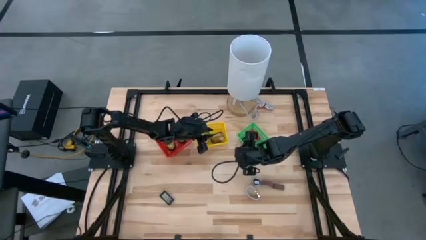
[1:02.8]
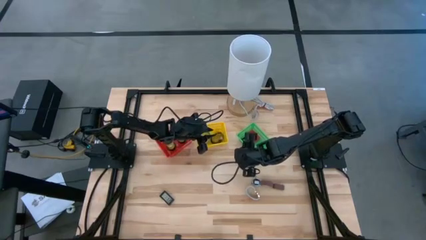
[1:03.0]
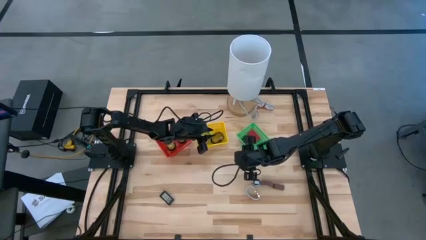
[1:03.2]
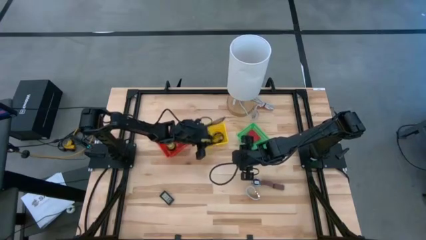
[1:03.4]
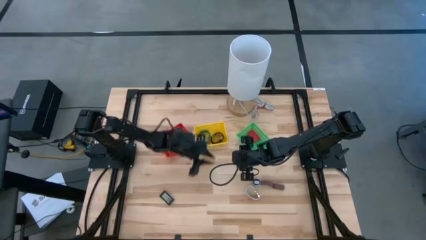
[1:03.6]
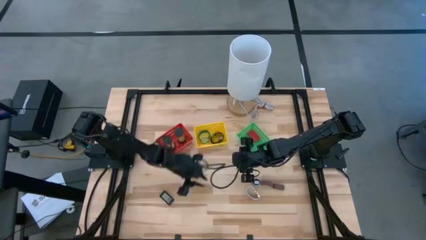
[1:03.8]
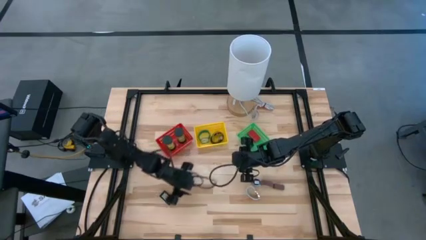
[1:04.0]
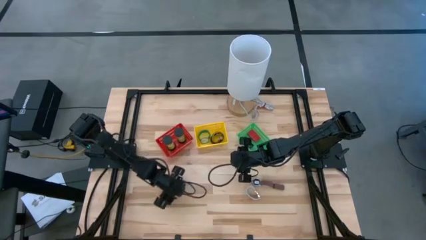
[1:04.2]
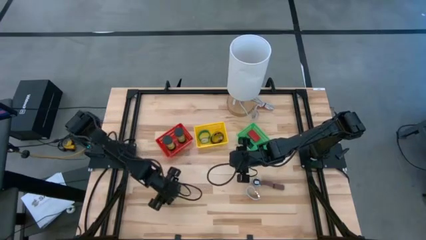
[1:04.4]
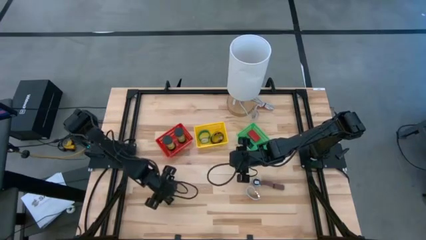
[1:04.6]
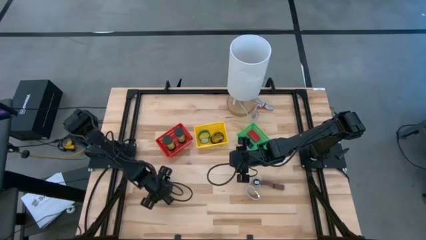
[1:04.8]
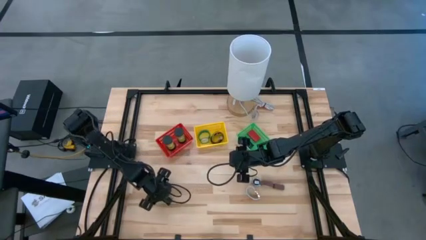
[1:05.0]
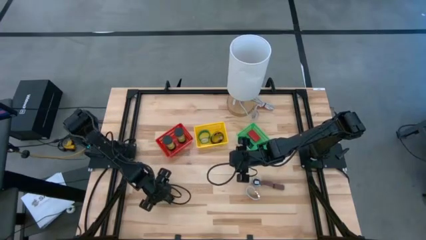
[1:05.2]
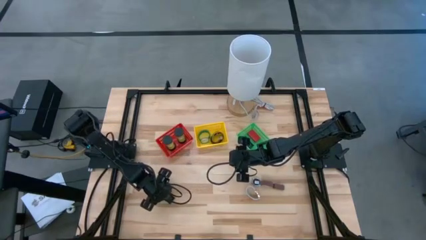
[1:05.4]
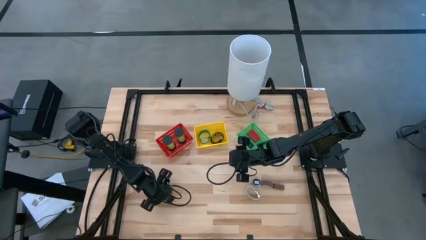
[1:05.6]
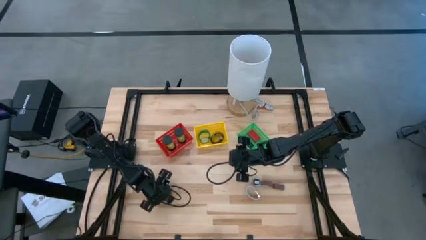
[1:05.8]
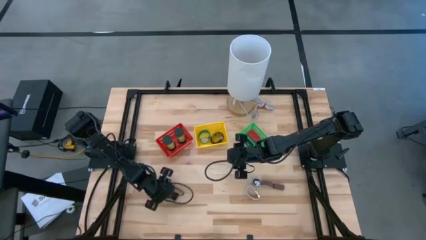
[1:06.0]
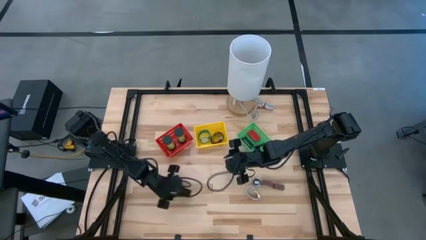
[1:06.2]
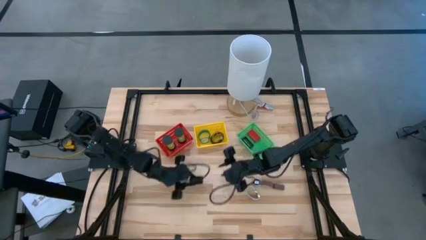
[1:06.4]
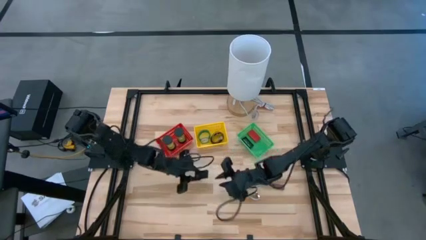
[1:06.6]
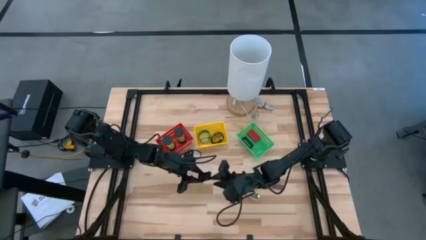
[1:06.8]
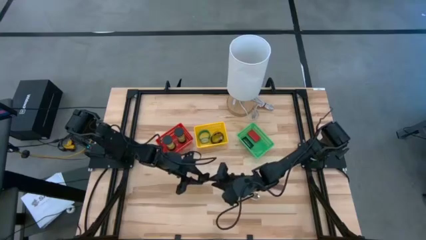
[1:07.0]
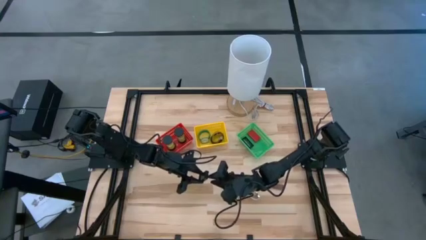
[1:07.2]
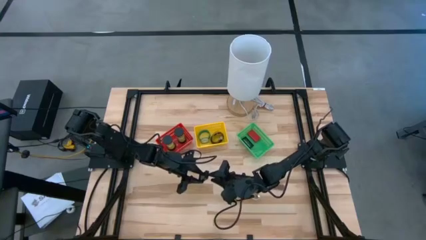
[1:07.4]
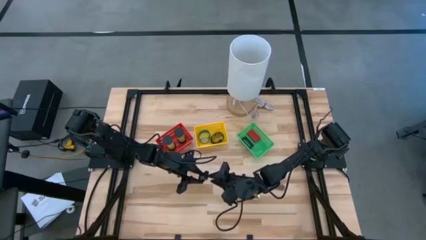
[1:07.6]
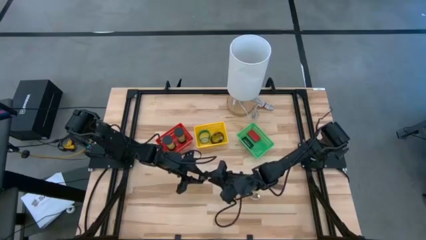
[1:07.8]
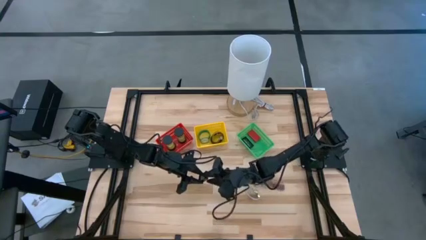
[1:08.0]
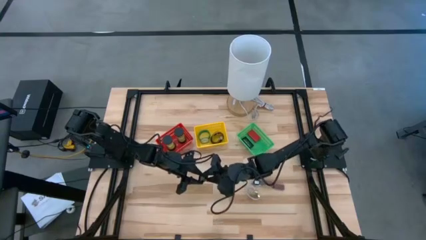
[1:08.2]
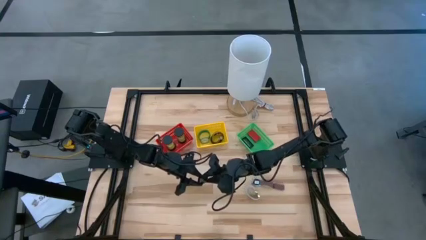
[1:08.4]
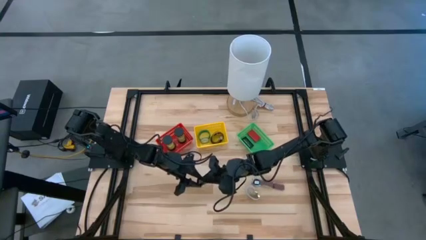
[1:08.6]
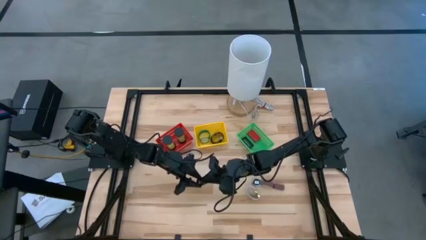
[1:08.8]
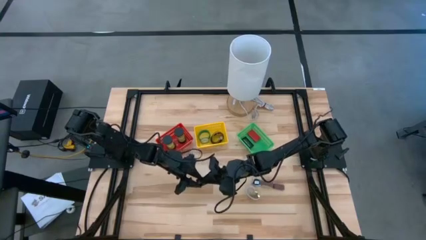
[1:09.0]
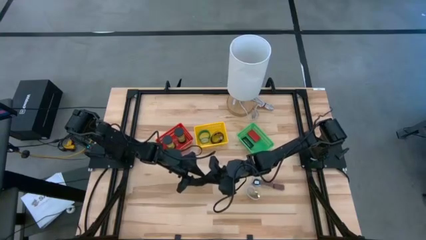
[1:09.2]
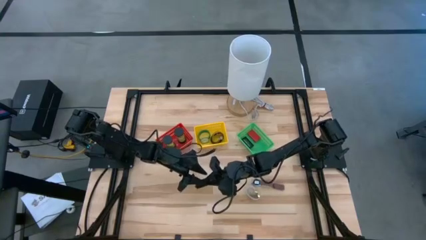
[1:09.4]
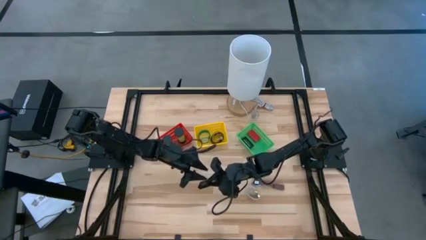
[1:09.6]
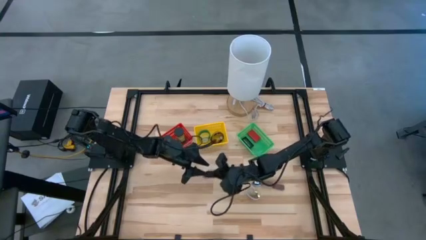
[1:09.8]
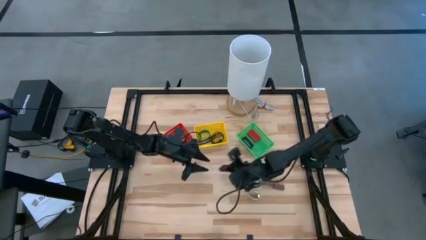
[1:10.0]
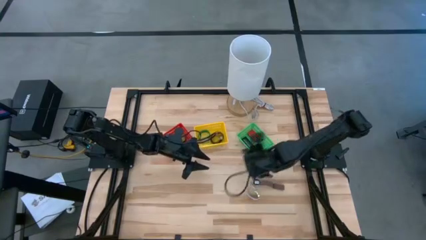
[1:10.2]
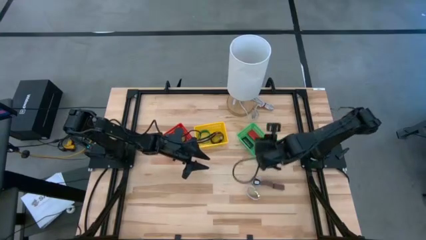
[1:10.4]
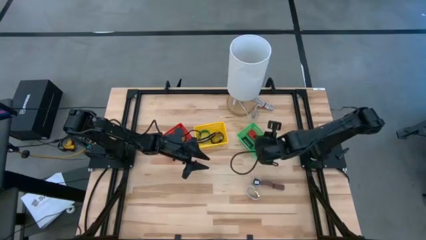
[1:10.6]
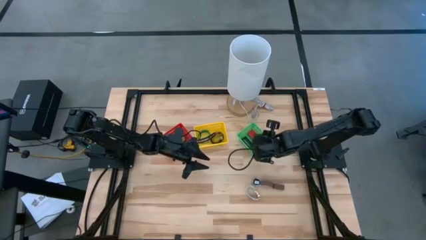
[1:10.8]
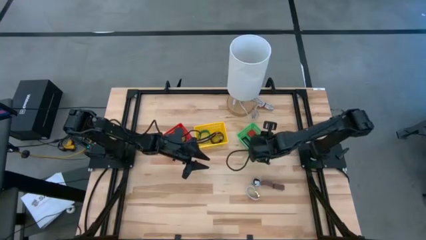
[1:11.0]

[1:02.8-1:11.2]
Task: Pick & Place Office items
Put the black digital timer in the green basket

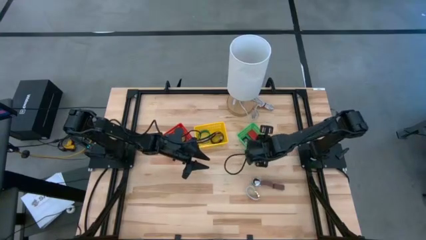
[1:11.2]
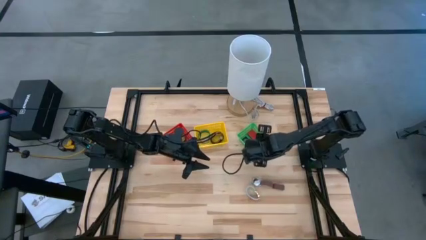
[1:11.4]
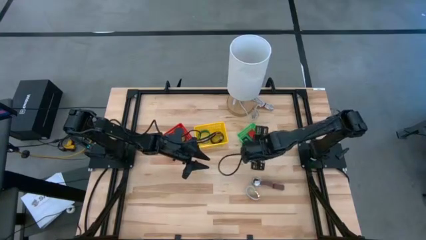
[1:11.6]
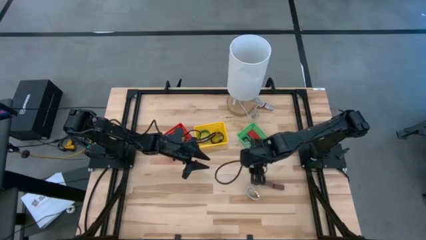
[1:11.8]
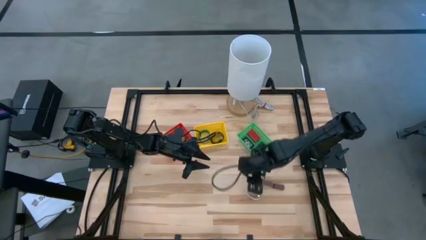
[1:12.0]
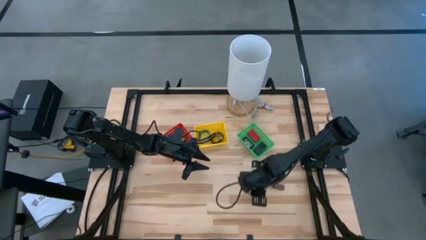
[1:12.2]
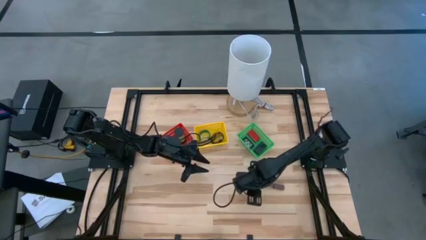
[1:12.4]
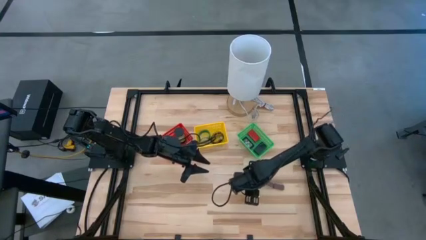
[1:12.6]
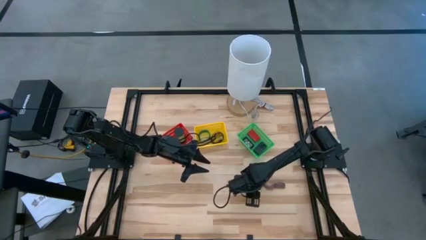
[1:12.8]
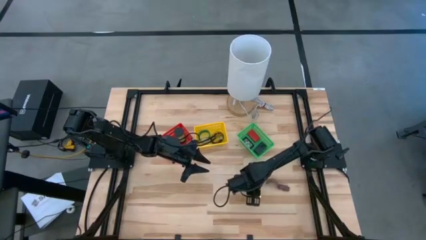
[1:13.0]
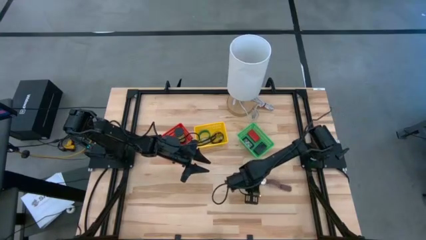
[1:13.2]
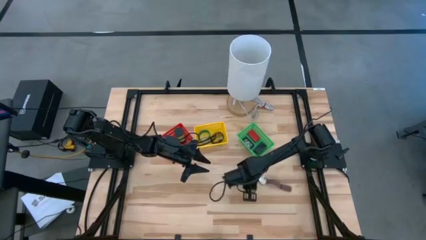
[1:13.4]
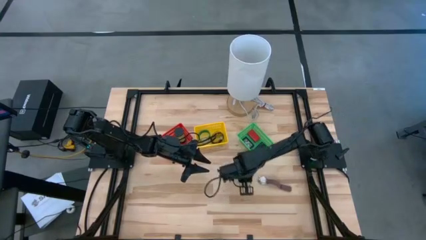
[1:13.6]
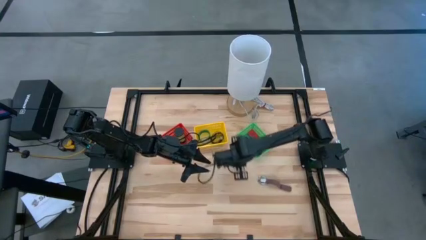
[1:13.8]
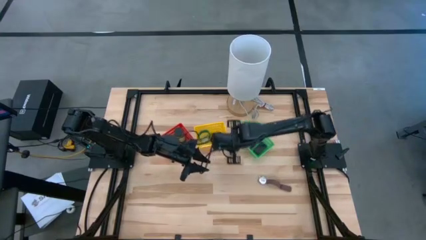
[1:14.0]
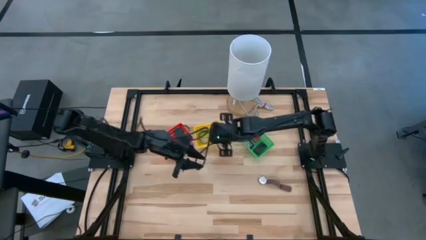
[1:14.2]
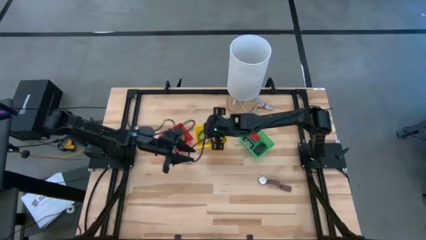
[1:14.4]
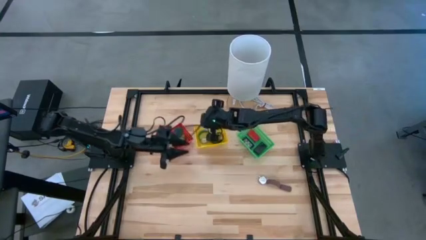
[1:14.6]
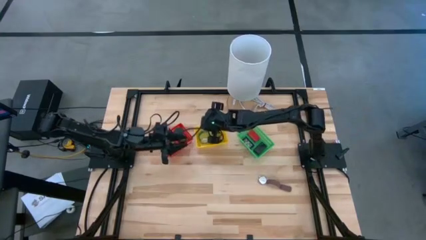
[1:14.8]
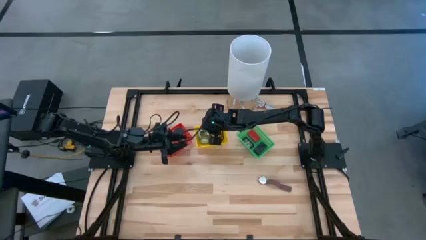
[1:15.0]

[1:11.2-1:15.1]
Put the light blue watch into the yellow basket

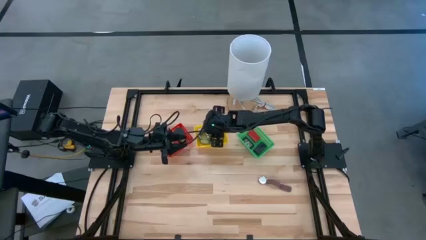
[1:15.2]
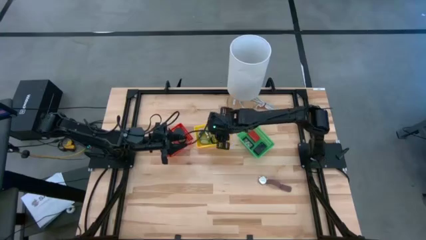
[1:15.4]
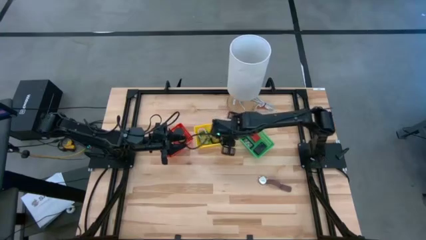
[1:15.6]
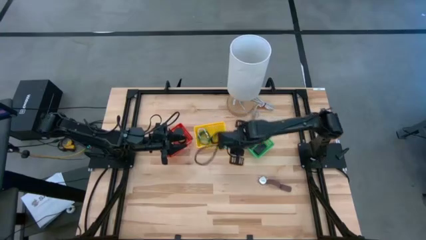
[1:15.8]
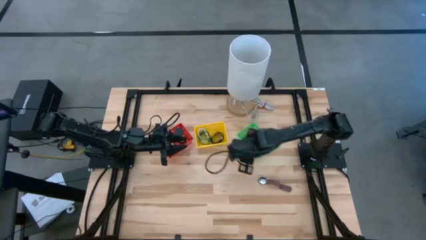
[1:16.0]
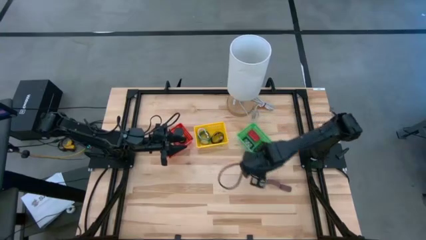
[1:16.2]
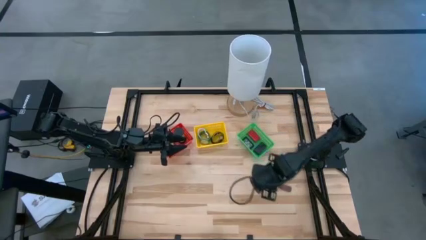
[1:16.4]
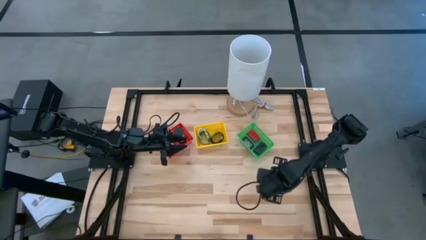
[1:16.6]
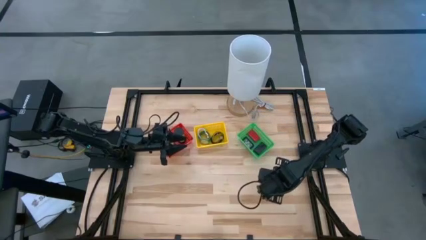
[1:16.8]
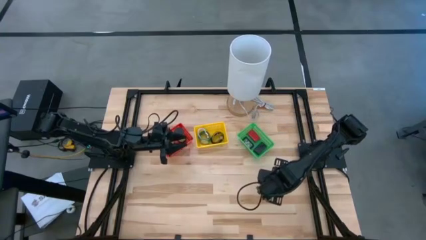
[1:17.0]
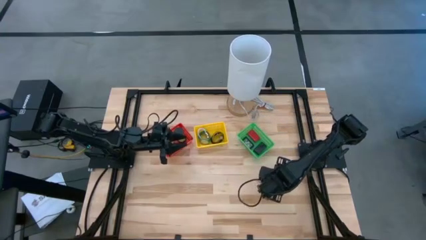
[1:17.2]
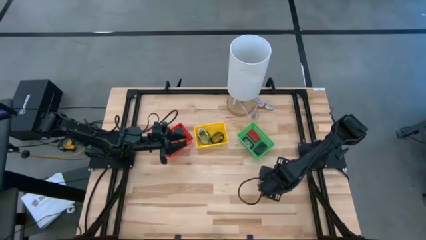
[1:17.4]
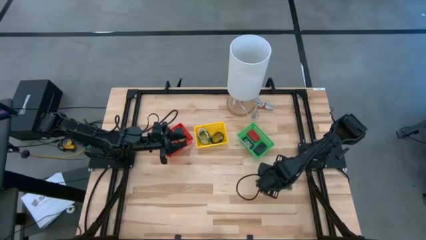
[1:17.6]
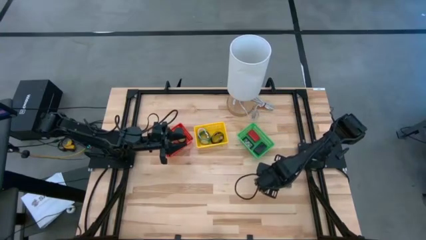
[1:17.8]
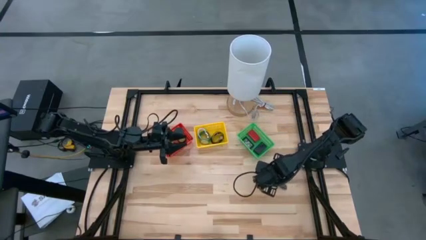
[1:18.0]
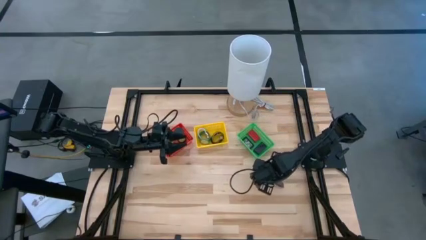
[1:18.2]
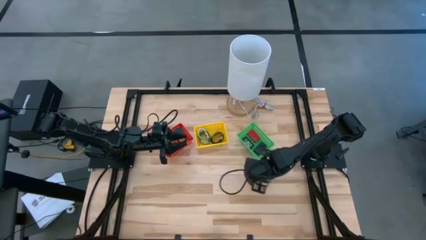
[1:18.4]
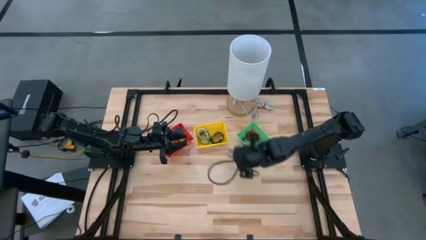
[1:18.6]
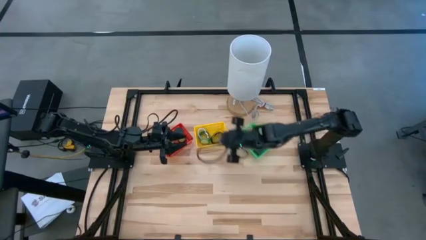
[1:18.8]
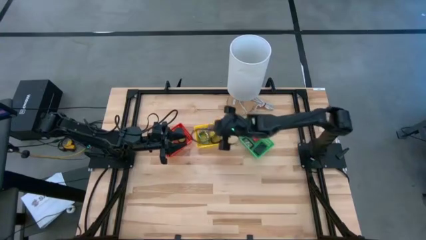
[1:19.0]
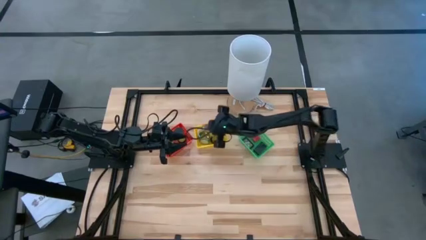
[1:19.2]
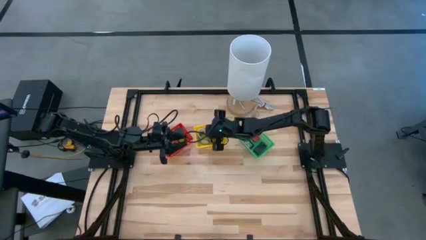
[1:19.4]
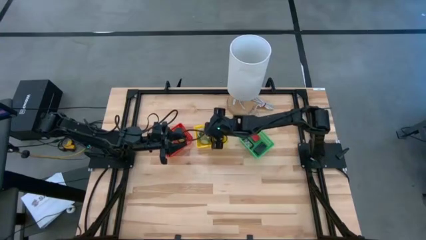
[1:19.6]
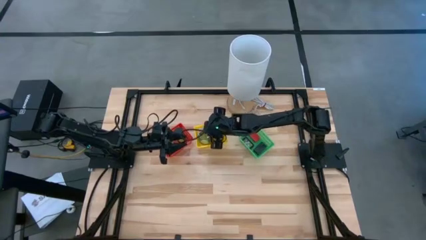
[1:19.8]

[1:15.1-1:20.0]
Put the brown watch into the yellow basket
